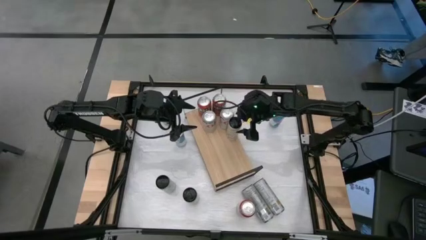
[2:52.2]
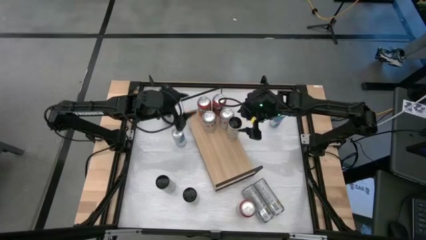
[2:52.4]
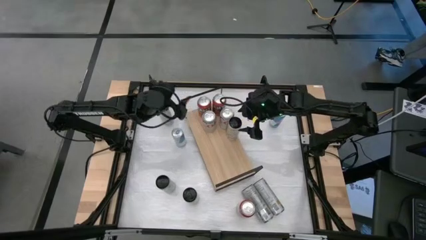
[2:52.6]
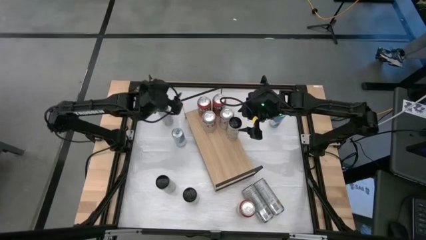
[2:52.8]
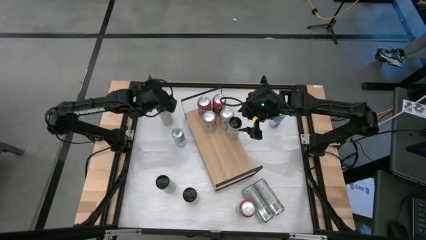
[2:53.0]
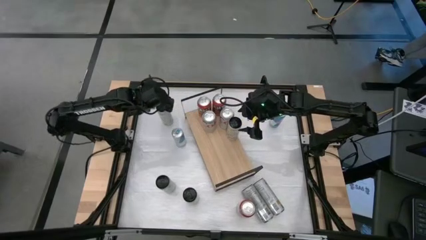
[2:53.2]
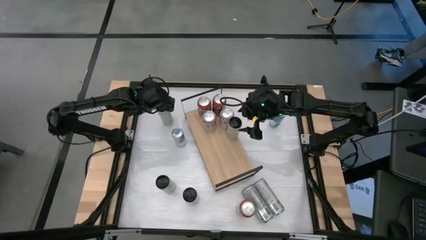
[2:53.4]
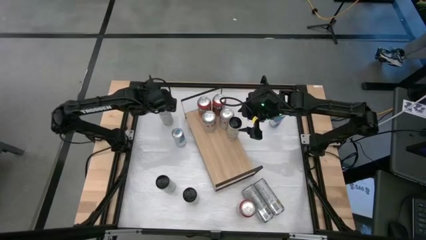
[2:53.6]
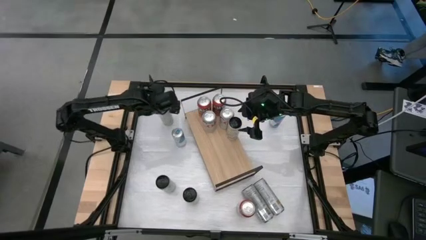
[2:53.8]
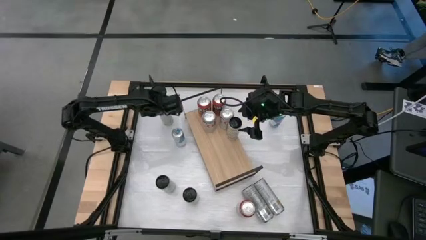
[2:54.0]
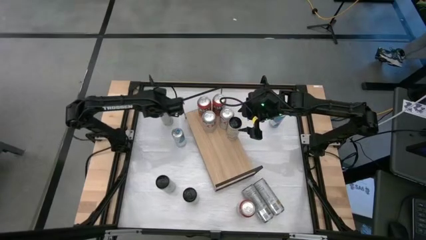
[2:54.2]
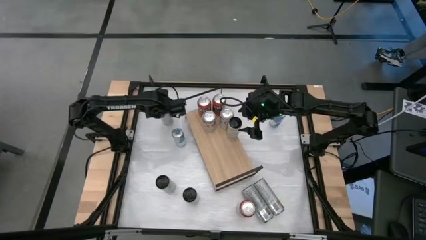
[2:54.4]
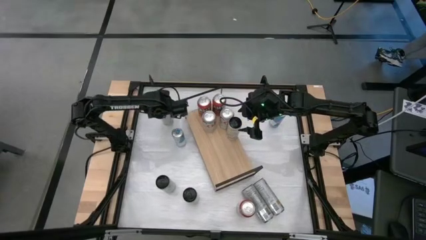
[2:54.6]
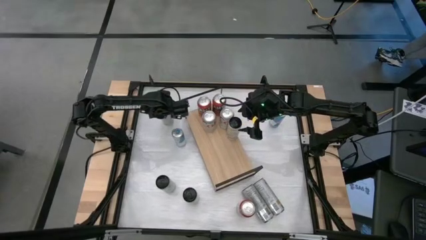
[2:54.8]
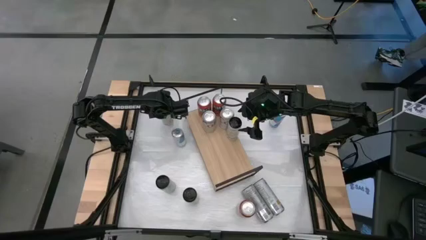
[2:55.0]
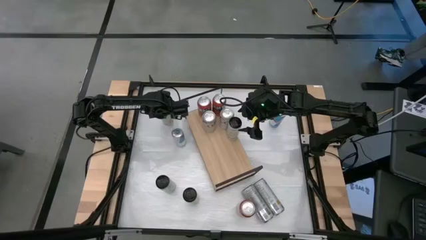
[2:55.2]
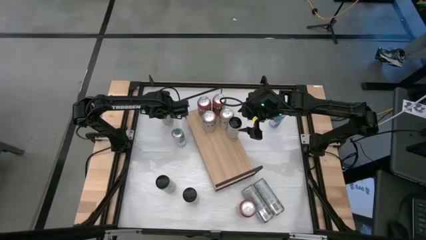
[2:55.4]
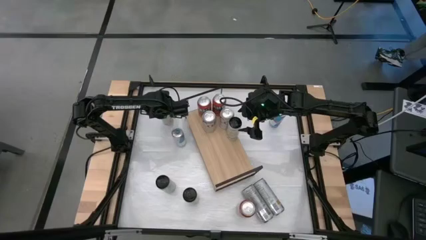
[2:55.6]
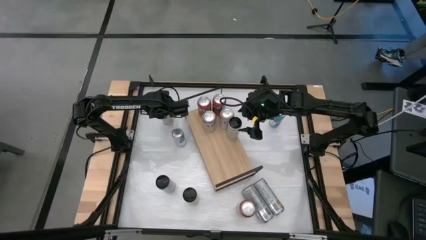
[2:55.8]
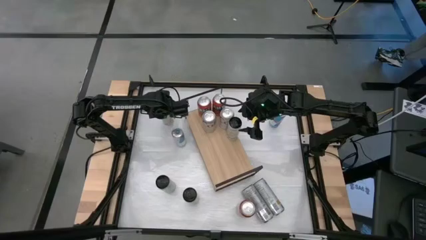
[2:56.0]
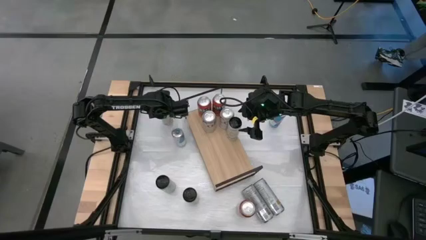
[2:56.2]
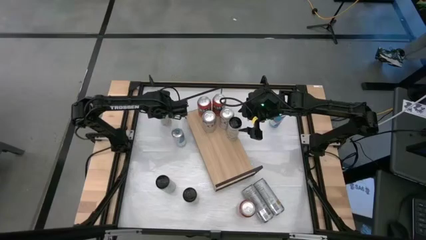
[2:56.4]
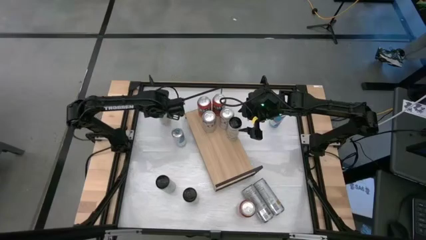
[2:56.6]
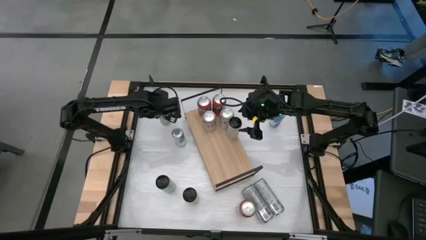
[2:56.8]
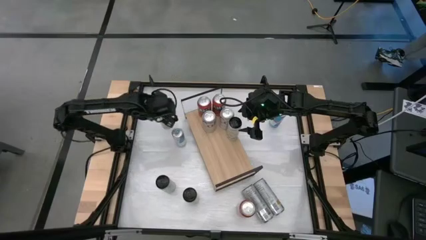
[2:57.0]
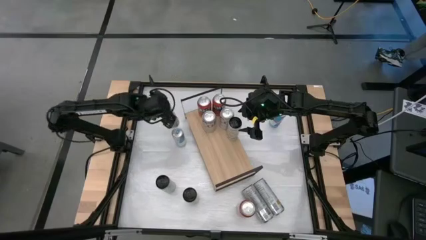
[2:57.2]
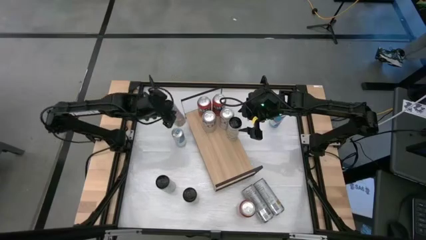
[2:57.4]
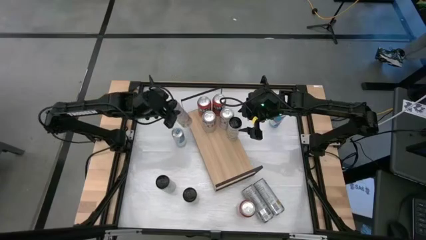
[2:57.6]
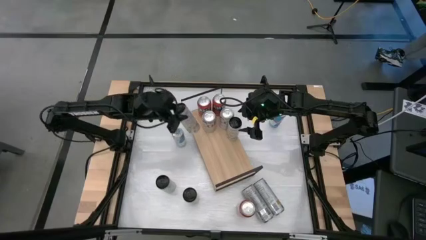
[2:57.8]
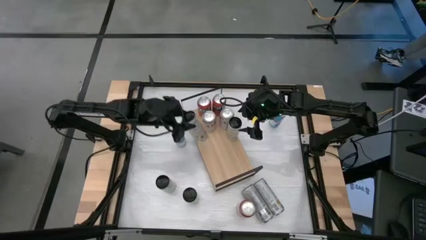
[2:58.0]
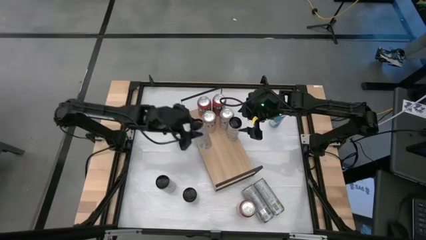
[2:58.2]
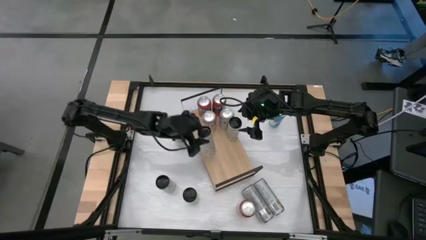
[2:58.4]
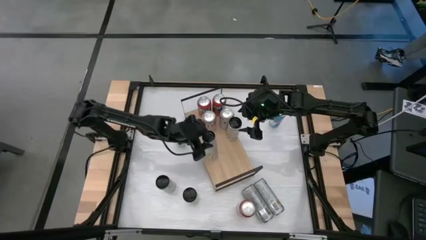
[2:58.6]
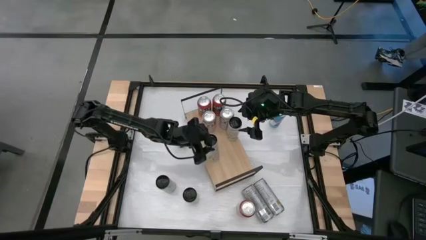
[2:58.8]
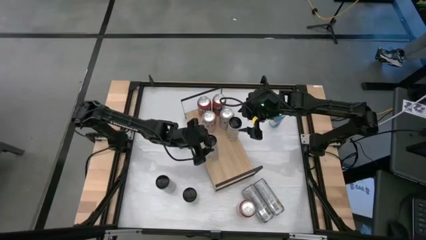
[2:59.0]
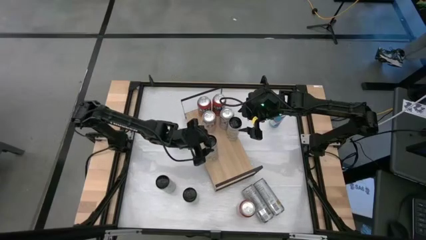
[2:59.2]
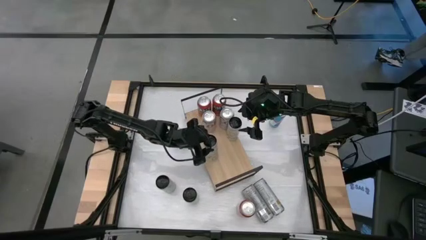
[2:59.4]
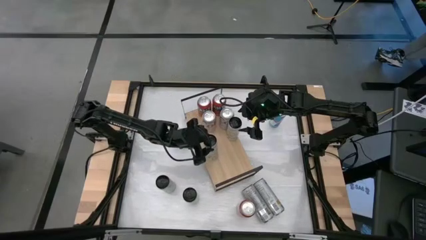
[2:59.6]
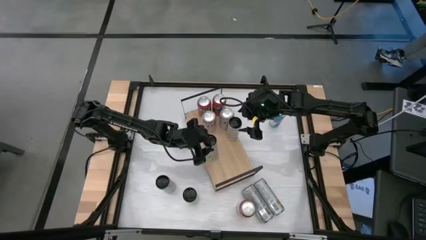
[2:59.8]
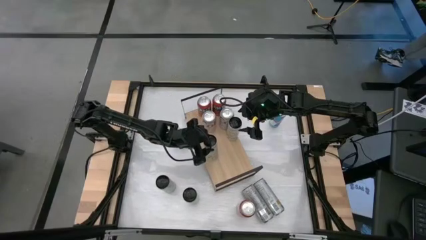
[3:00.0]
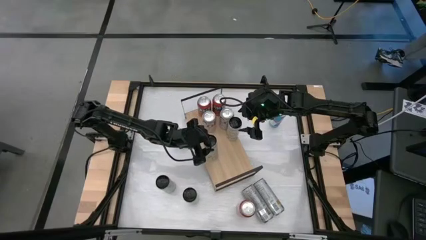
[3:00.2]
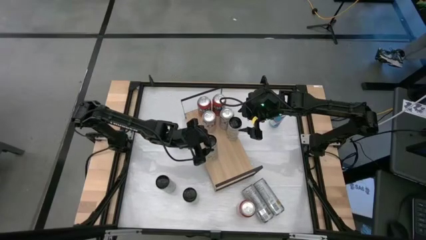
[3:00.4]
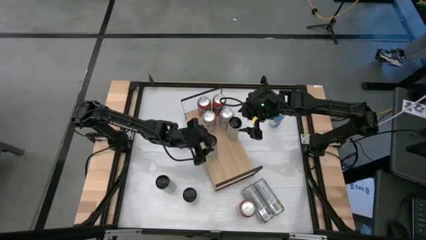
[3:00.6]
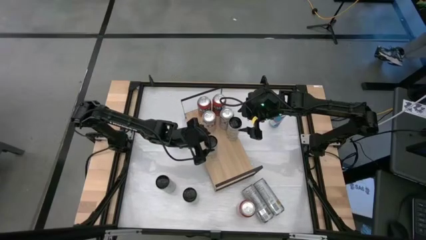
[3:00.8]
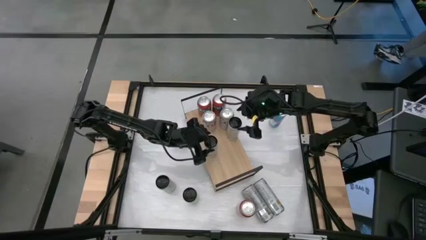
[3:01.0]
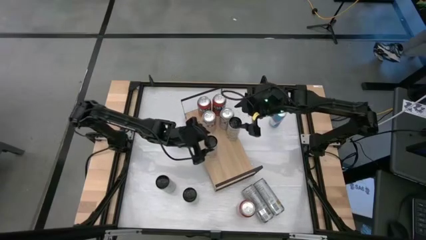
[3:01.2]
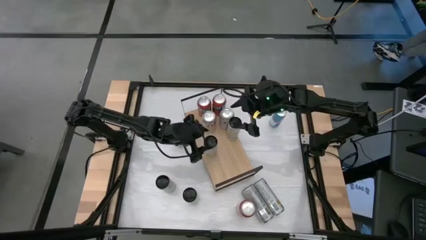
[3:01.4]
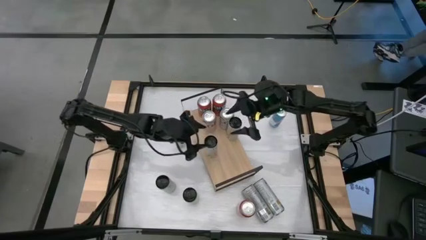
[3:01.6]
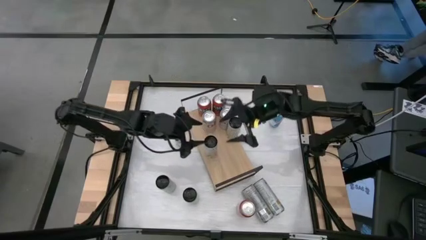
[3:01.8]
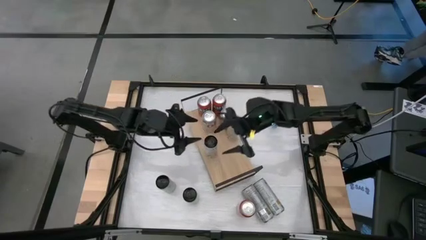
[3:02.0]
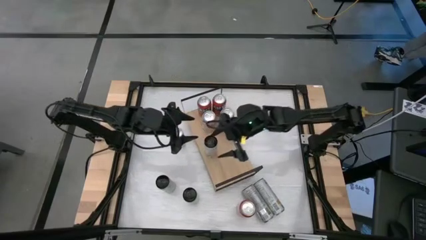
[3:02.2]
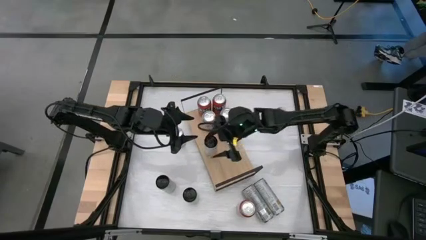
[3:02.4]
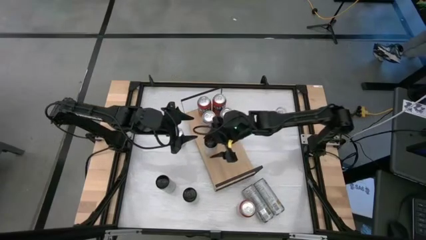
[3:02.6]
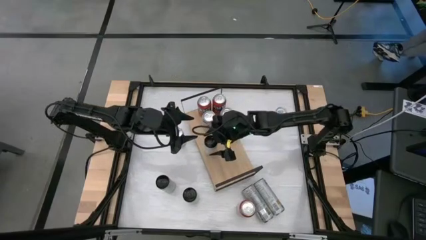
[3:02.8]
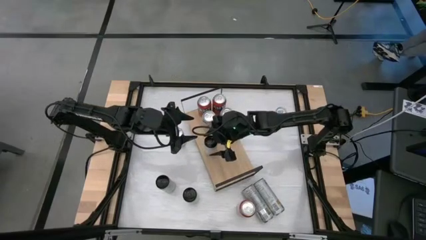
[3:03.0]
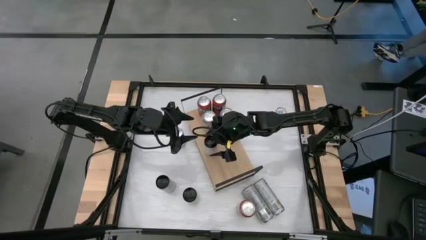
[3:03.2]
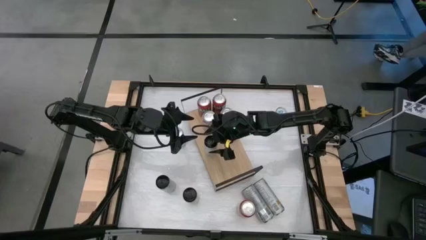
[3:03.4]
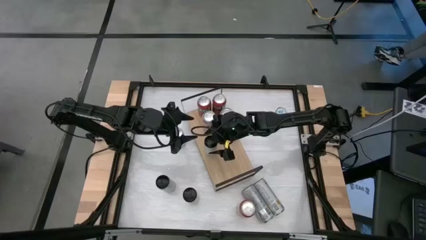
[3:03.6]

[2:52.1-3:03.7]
Task: Place canned beverage on shelf
Align the yellow soda can with the other yellow soda can

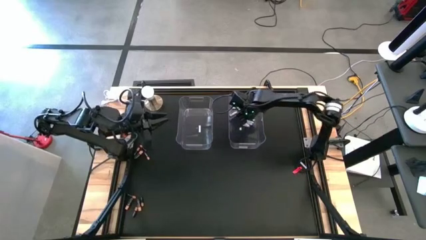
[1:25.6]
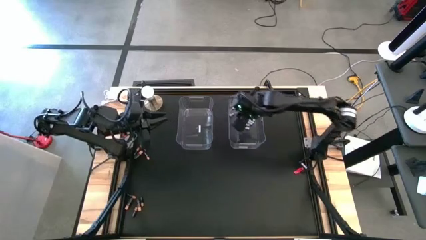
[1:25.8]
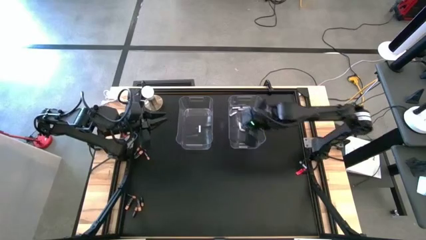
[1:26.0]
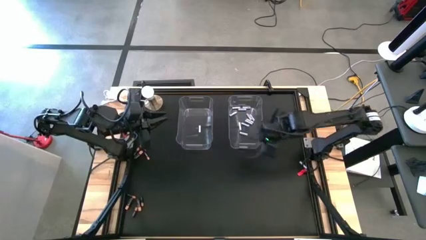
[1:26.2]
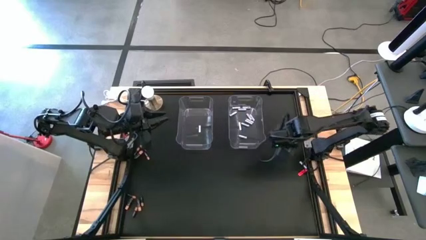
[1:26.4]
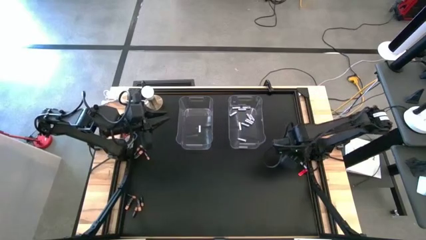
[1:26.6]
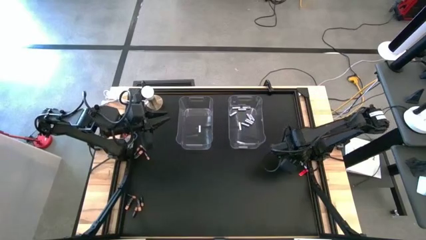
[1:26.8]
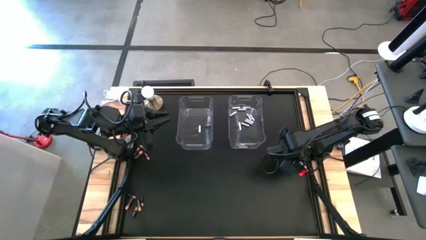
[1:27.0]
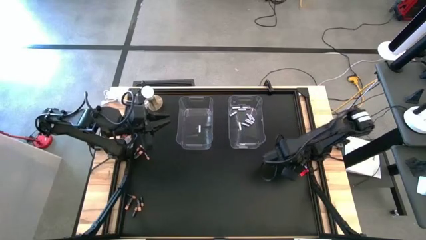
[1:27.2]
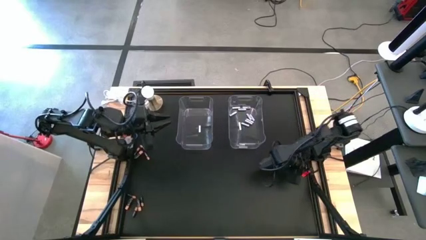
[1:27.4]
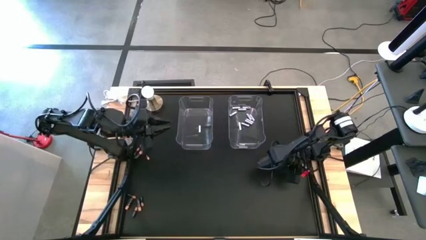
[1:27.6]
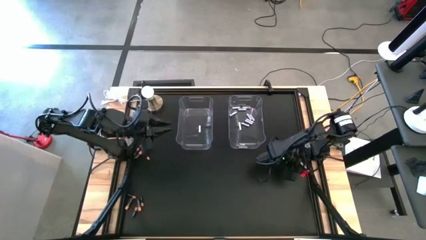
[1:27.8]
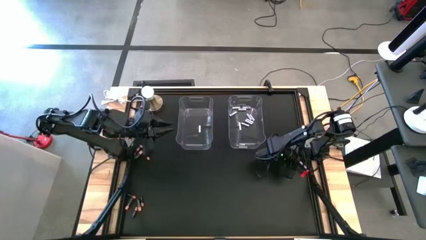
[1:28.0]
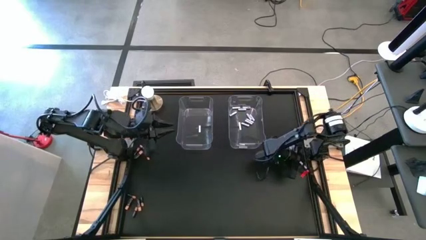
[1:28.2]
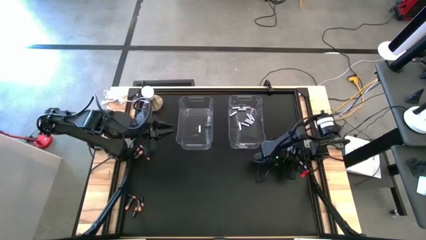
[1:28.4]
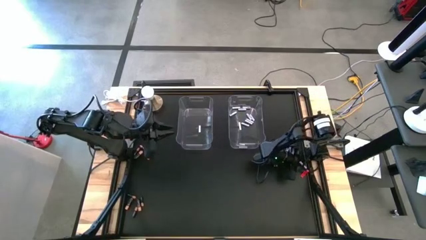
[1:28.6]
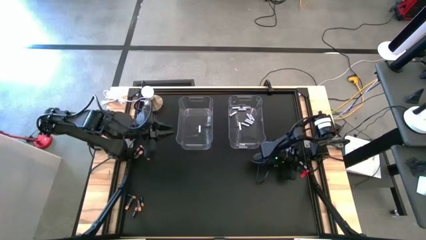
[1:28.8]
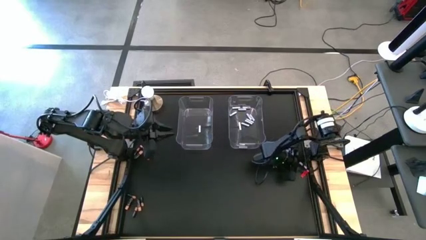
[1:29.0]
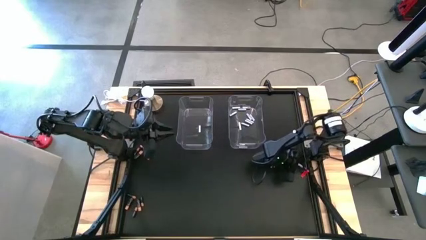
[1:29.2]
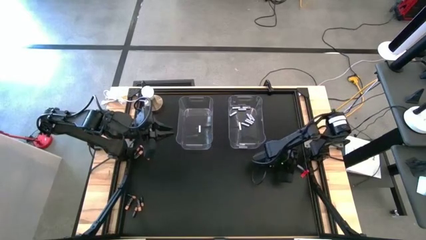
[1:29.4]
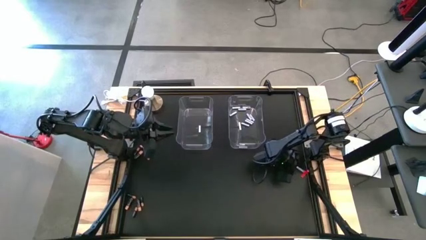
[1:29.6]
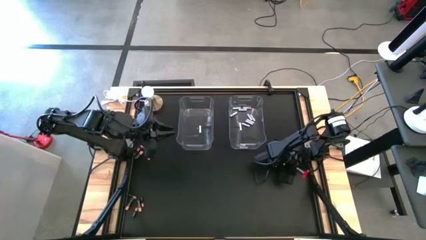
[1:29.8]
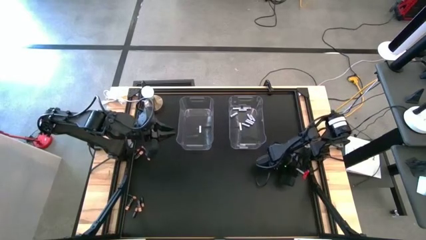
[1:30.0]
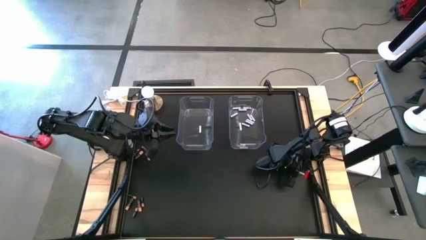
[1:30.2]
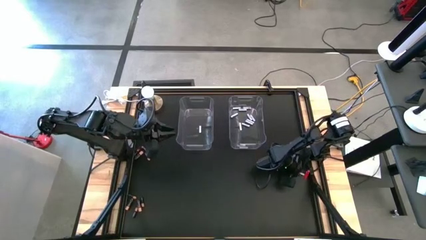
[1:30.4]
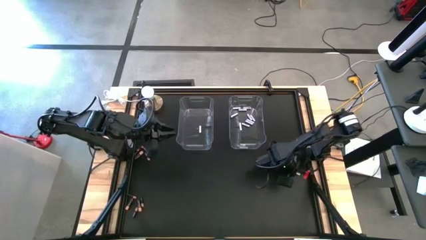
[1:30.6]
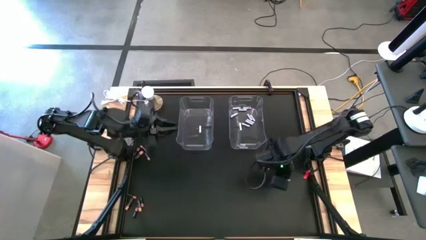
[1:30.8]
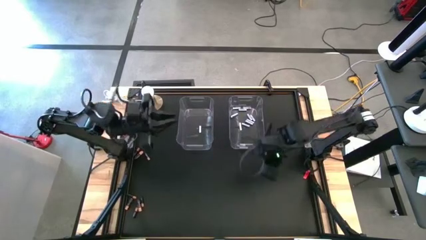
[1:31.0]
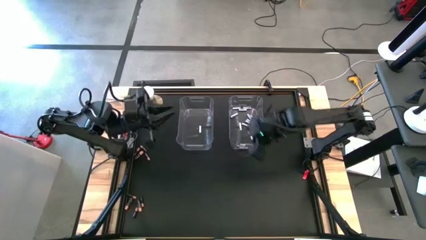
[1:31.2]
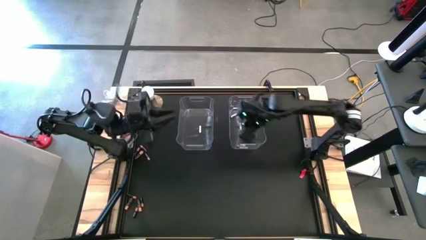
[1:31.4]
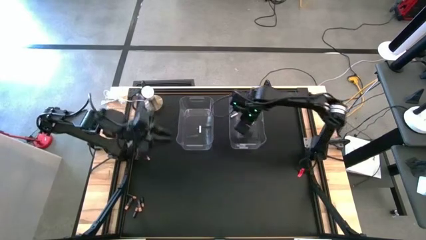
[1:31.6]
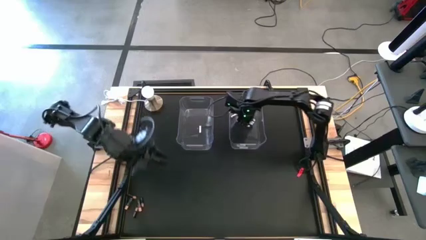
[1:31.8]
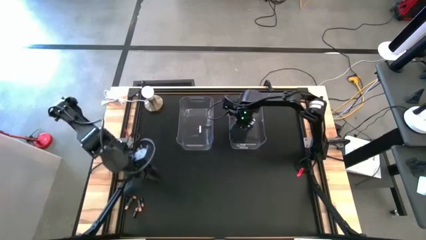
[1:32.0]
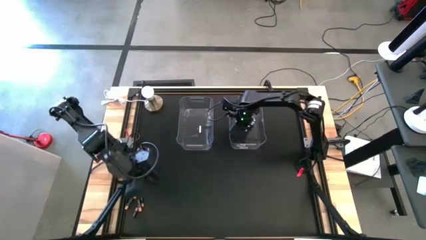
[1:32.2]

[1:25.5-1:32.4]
Task: Sort batteries
Put the white battery into the right transparent bin
